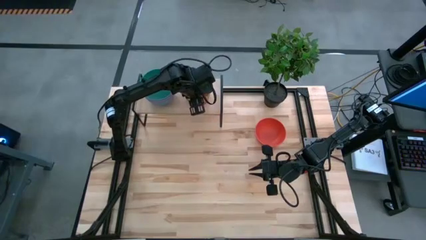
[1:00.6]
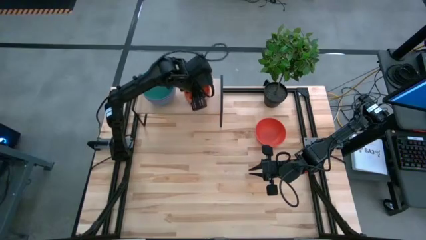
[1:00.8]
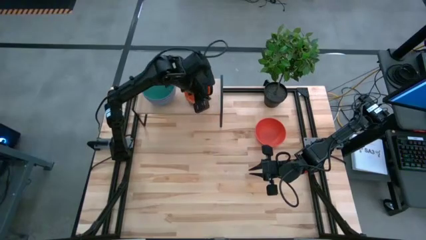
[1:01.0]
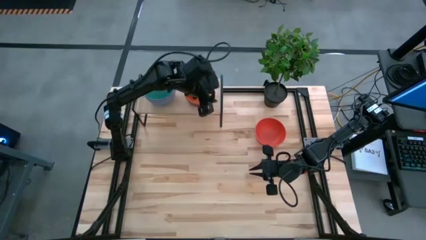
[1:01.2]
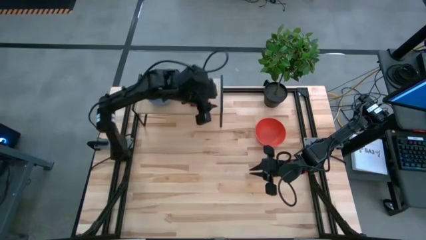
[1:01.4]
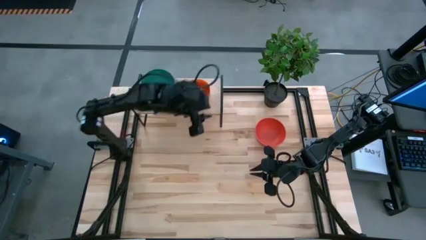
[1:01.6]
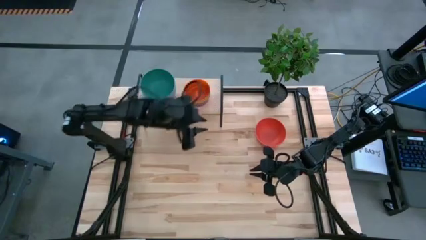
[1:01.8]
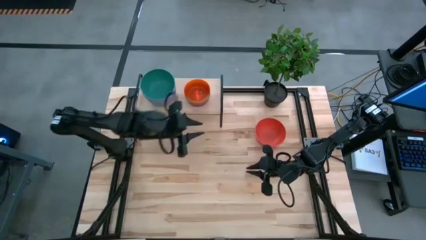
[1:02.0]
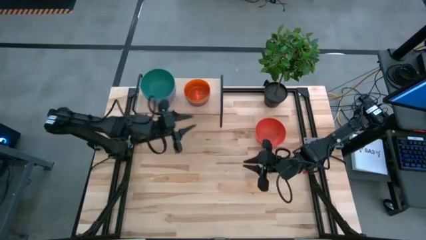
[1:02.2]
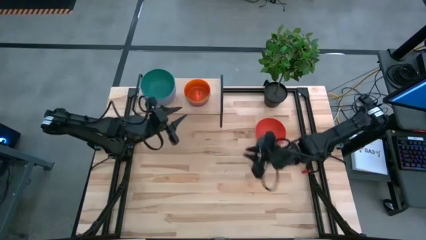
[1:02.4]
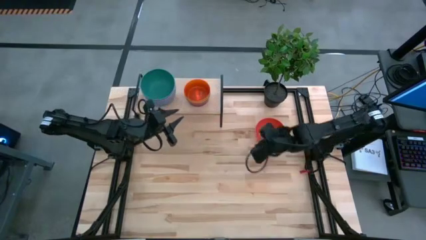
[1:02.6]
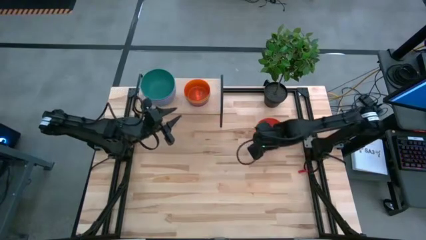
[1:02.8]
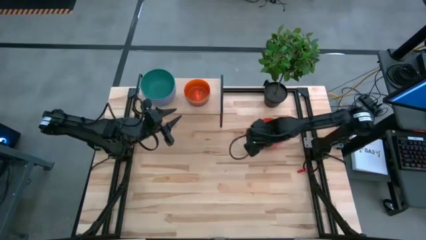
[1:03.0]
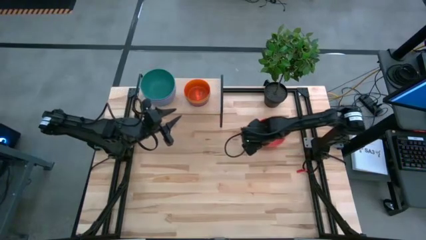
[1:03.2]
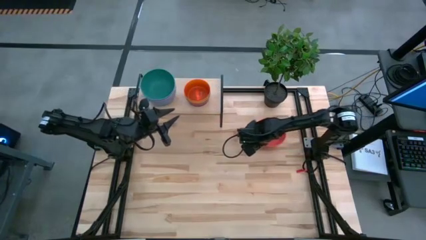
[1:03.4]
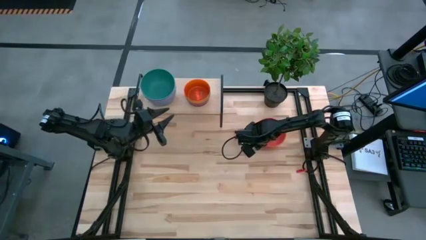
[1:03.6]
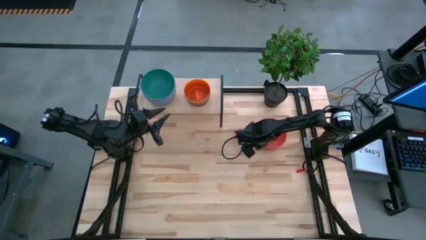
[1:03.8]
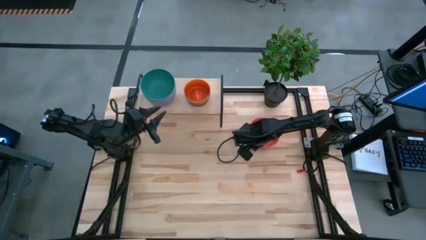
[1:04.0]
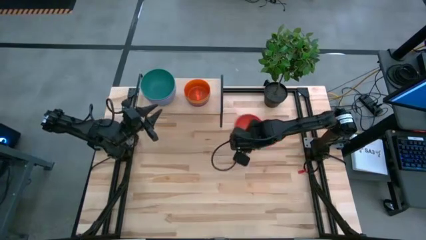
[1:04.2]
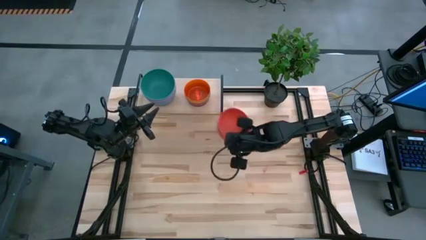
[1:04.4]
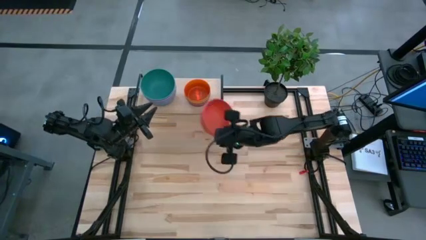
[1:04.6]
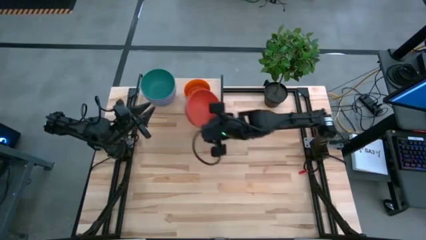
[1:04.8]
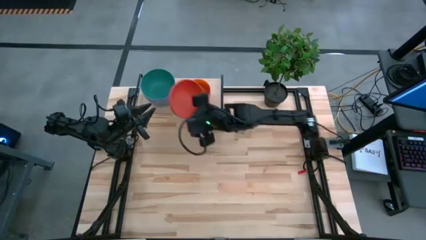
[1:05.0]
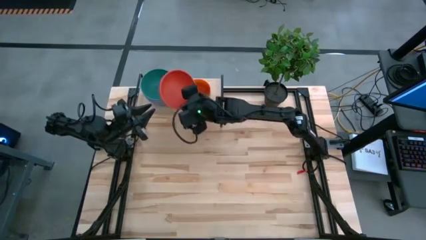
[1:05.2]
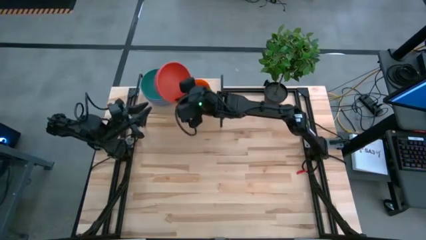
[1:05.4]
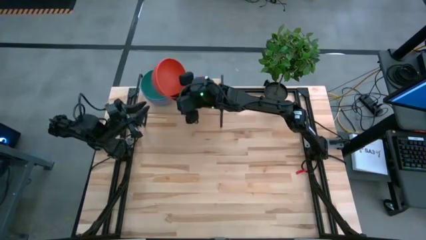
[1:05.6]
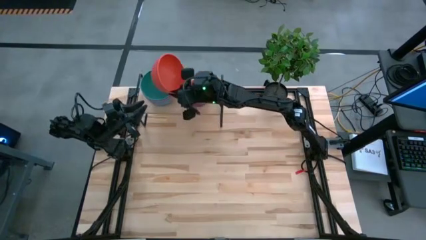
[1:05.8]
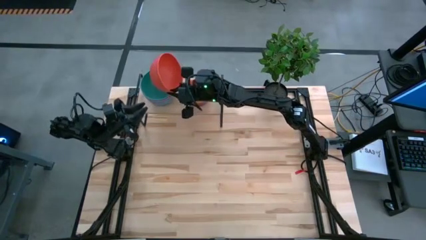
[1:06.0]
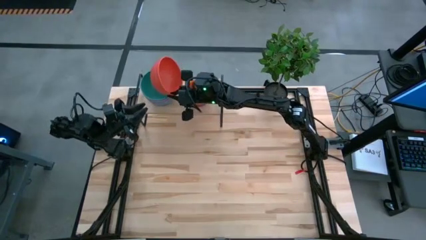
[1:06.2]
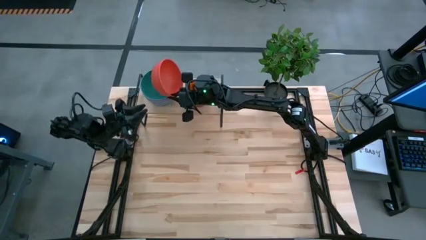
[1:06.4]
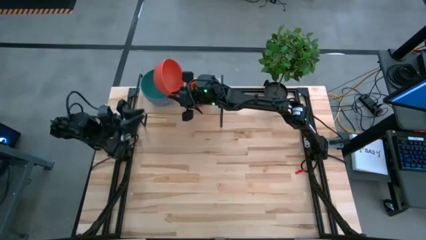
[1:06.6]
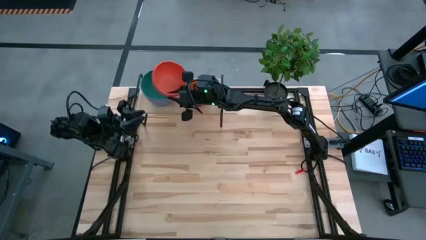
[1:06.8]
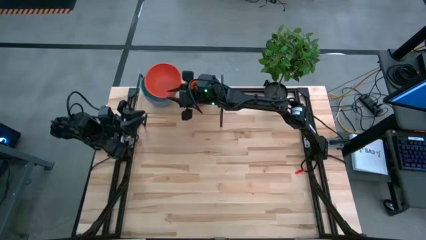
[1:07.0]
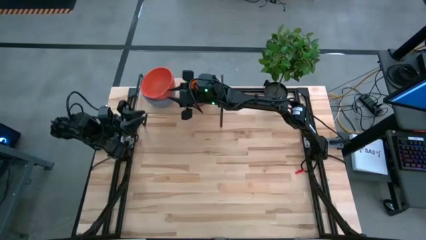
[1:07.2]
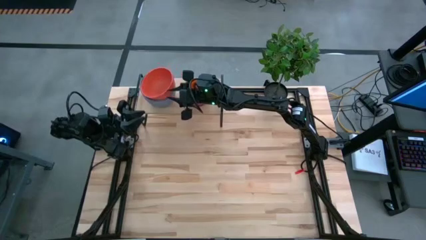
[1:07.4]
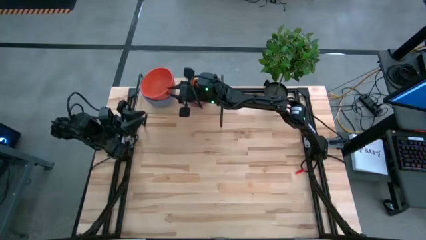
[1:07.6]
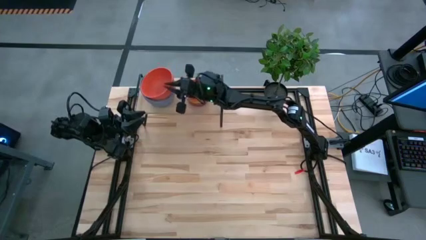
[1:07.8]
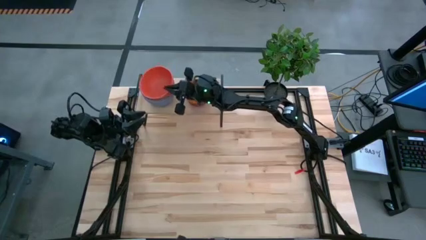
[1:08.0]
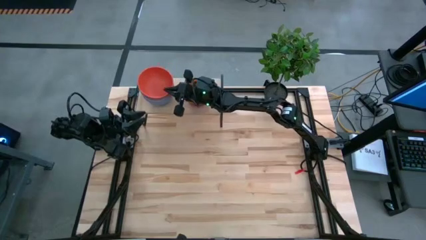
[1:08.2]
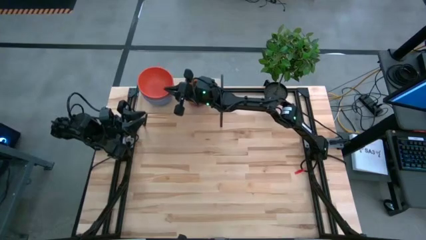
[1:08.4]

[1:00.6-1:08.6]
Task: Place and stack bowls onto a shelf
Stack the large orange bowl on the dark green bowl on the shelf

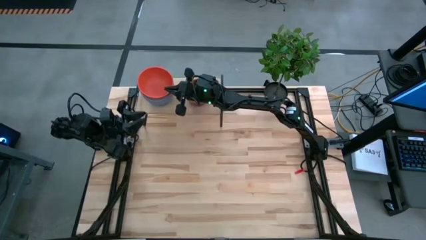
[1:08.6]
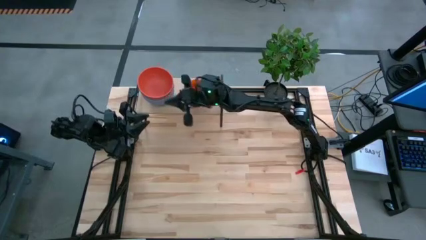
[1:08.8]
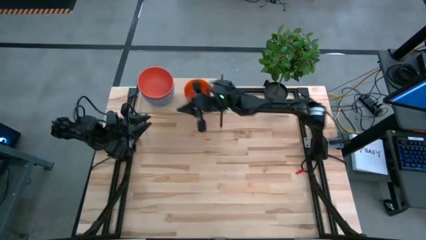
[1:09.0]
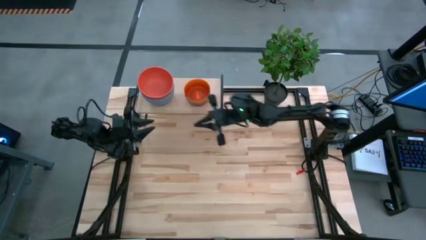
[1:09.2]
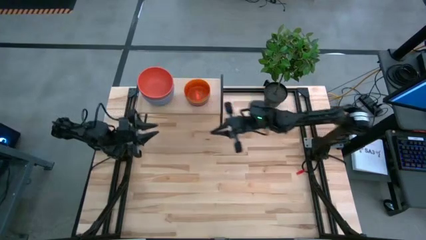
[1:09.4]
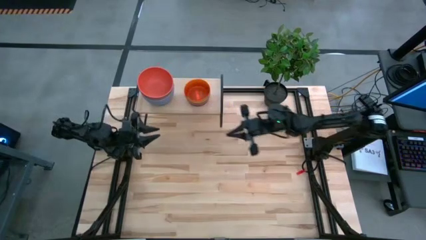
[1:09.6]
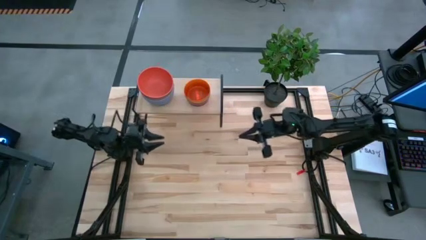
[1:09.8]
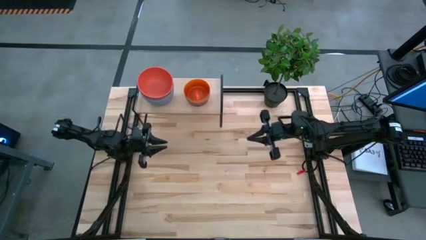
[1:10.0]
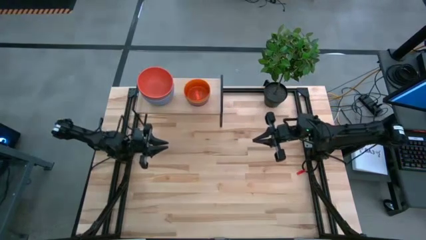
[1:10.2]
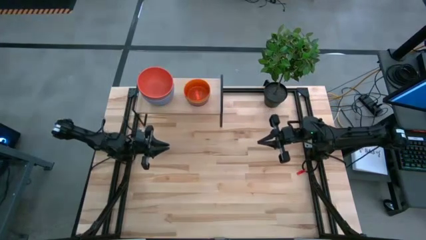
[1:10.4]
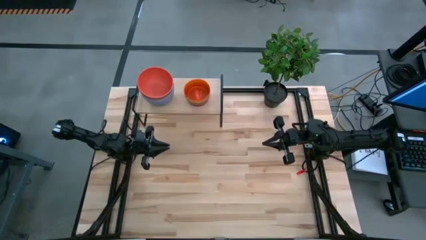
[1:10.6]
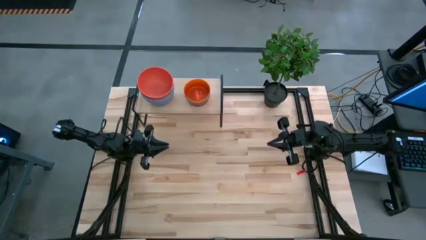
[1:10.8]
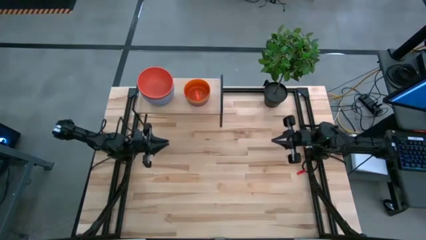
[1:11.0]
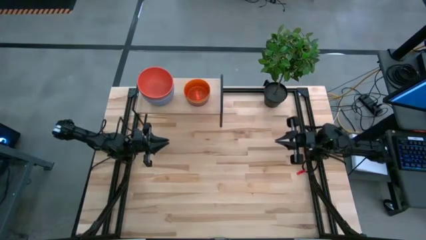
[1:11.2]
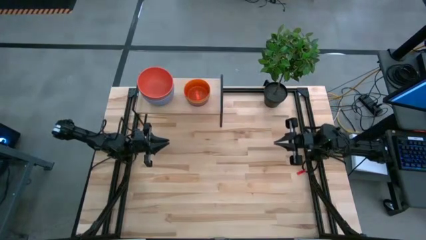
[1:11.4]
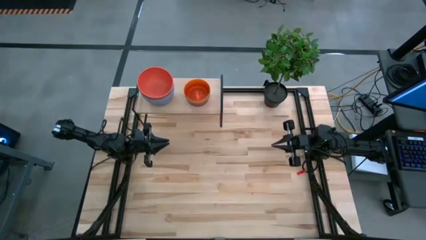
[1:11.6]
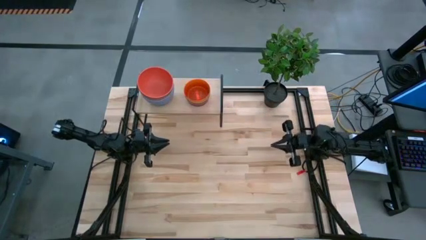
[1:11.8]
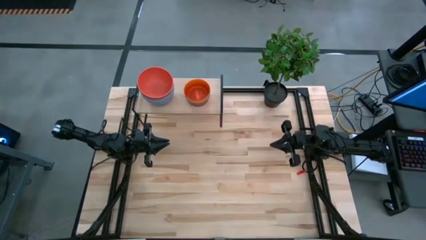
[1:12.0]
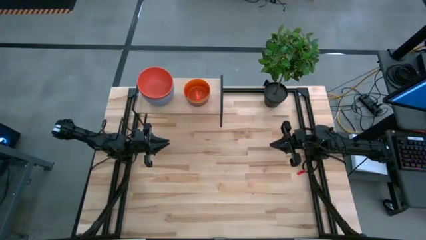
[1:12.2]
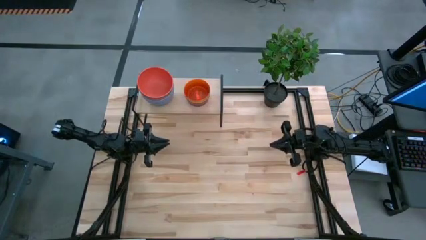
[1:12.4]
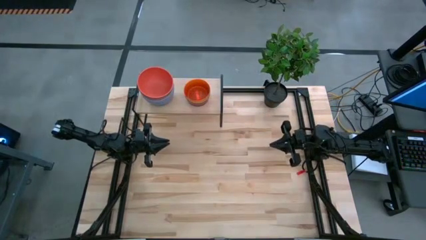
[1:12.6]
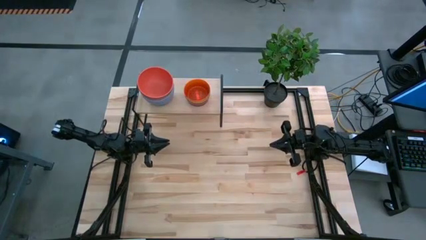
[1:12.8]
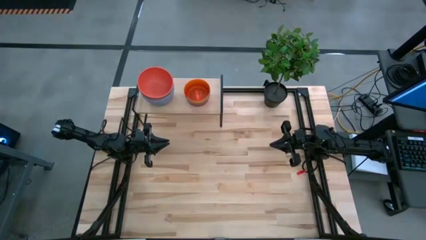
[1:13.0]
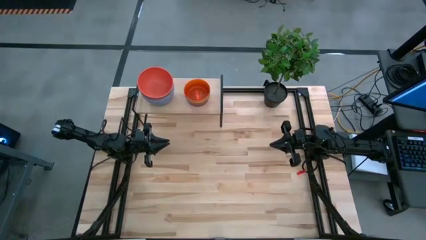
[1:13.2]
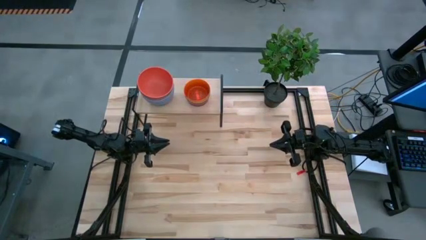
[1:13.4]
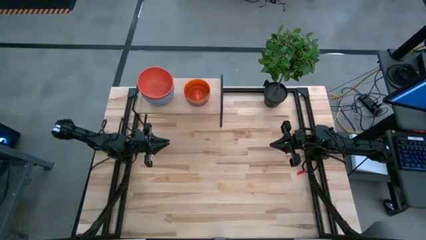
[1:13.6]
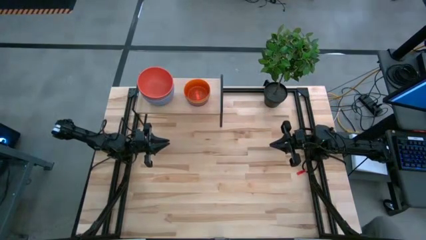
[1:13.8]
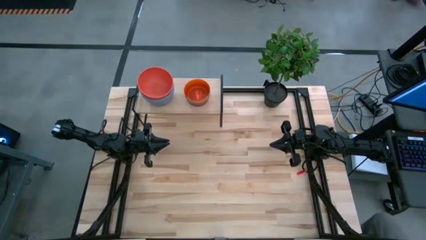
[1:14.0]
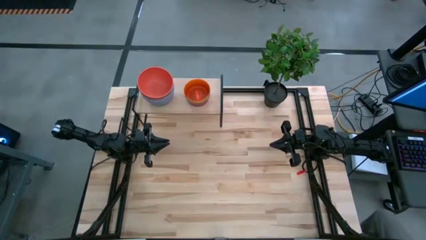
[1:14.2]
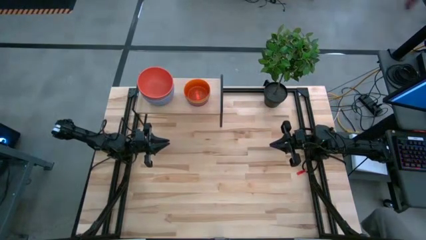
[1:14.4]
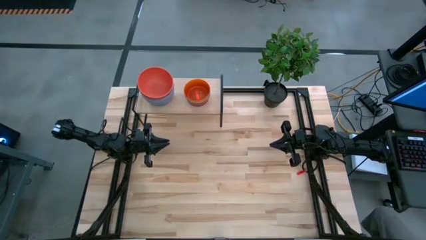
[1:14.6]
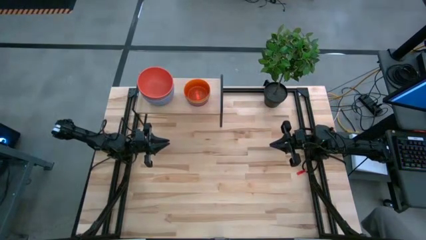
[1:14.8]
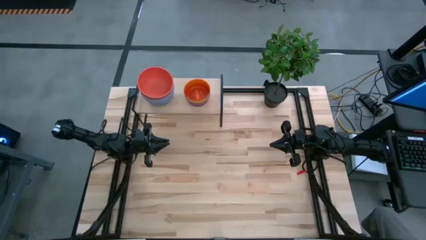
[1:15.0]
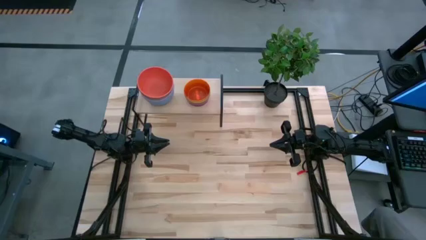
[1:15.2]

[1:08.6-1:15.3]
Return to Home Position

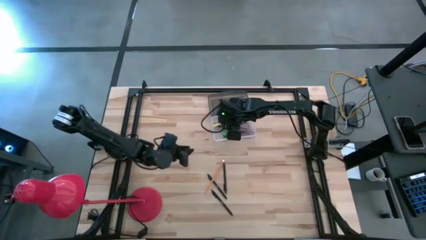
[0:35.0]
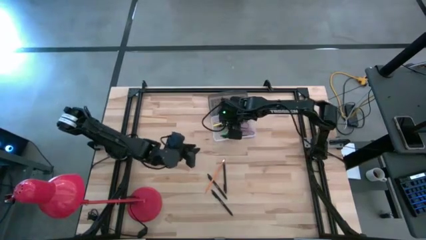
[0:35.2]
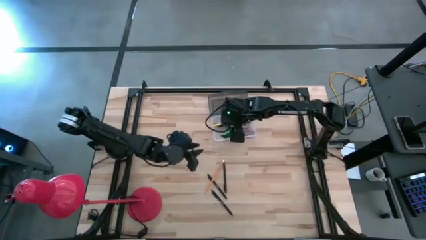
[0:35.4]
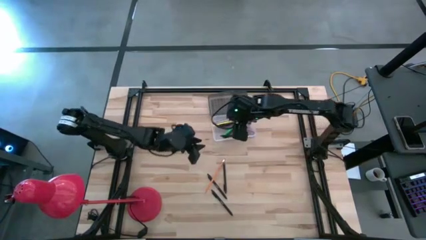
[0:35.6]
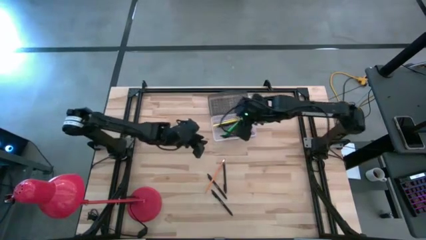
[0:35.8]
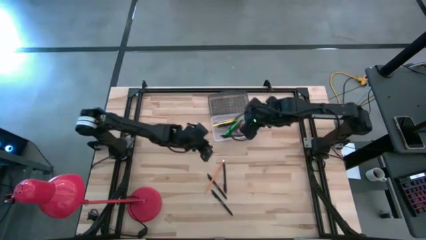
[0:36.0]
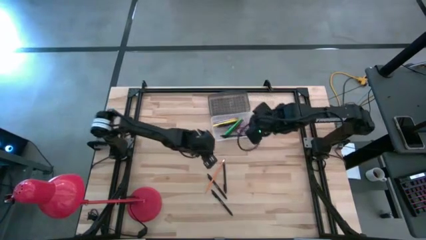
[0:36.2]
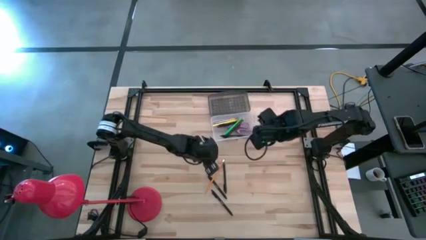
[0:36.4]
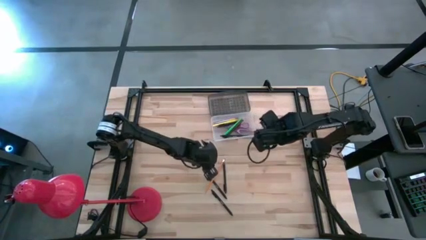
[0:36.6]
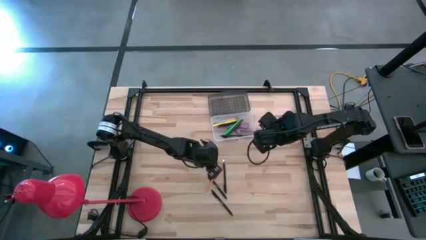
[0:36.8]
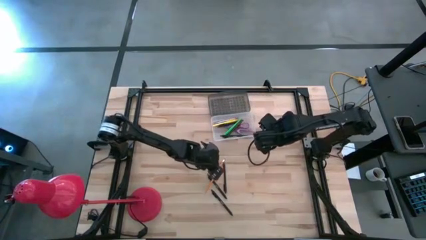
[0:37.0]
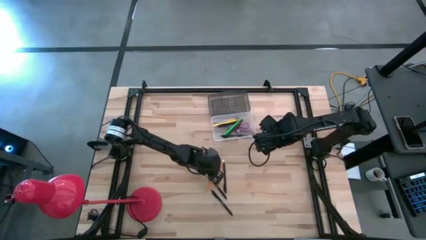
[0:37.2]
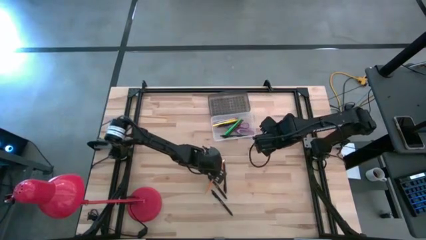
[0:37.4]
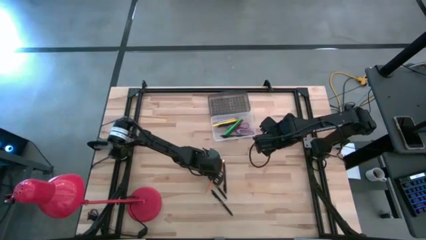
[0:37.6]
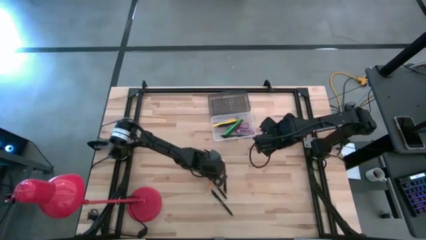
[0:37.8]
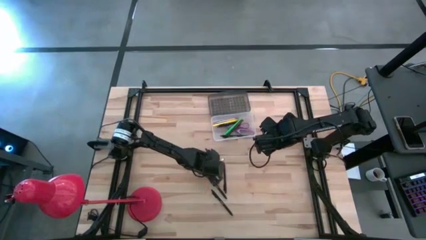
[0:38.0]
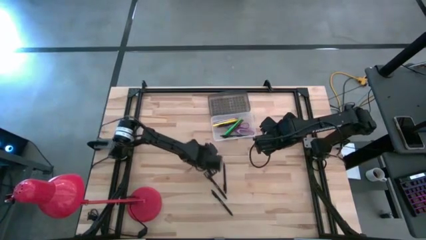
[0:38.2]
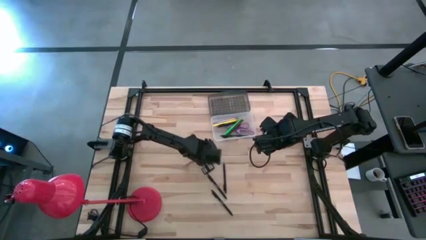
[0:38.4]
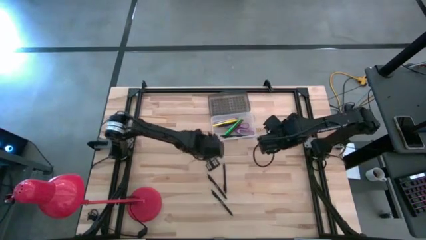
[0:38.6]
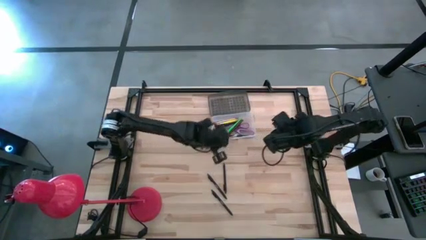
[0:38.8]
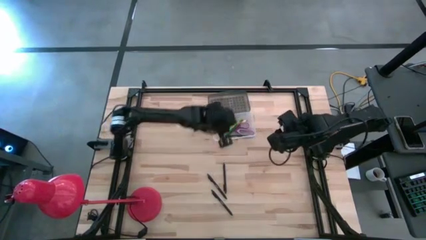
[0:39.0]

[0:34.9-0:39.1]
Task: Pick & place school supplies into a supply box
Put the orange pencil into the gray supply box
